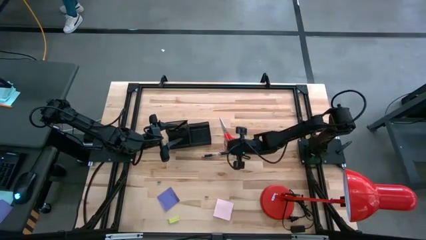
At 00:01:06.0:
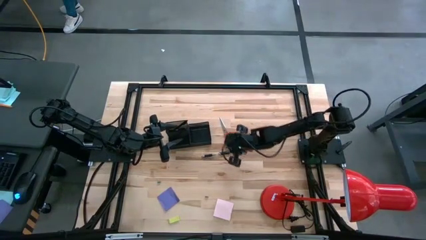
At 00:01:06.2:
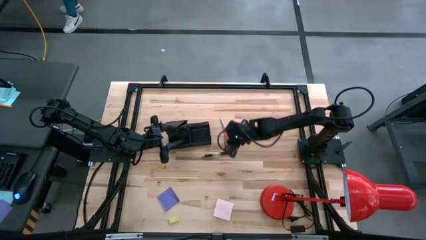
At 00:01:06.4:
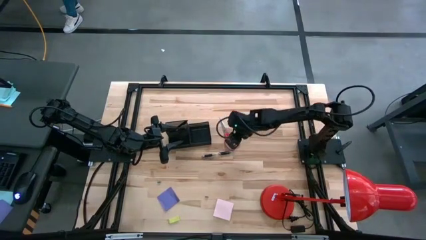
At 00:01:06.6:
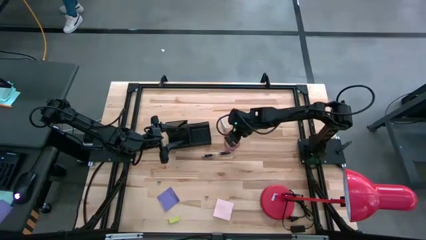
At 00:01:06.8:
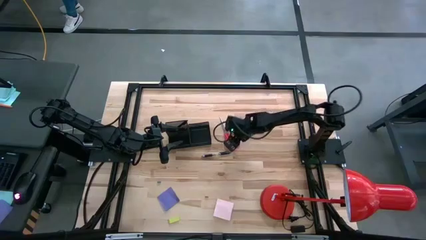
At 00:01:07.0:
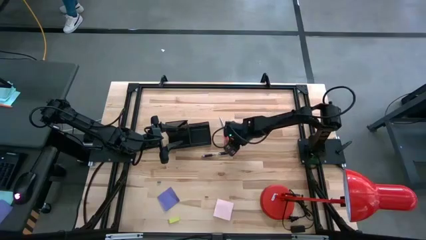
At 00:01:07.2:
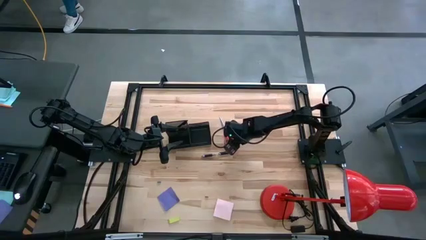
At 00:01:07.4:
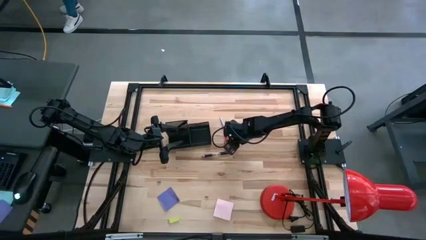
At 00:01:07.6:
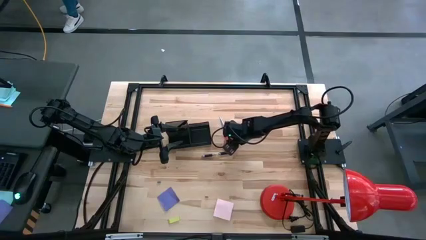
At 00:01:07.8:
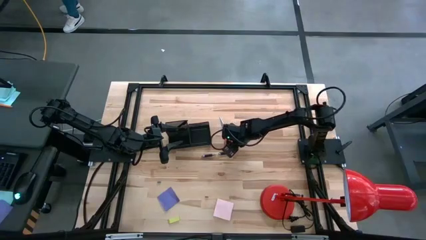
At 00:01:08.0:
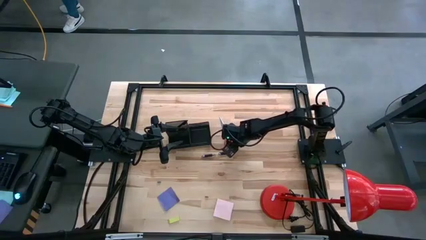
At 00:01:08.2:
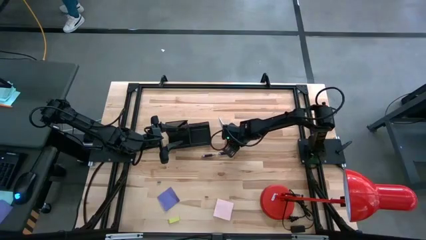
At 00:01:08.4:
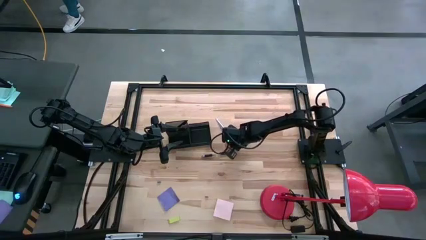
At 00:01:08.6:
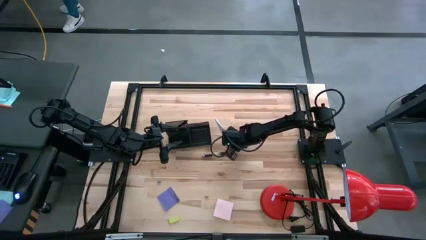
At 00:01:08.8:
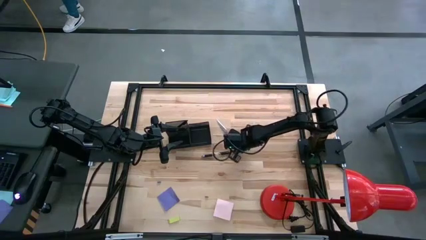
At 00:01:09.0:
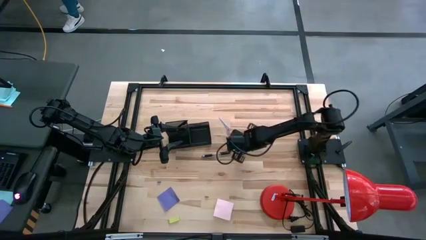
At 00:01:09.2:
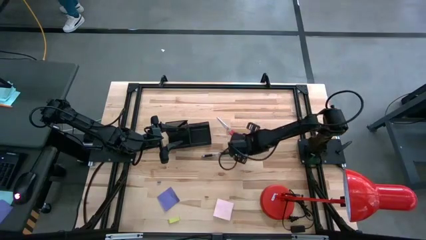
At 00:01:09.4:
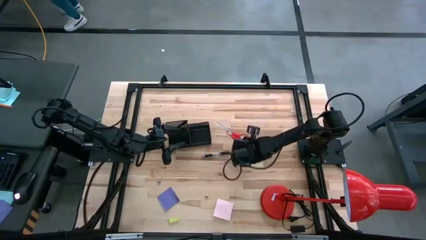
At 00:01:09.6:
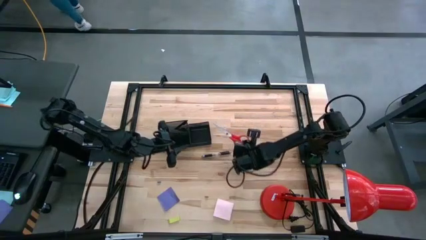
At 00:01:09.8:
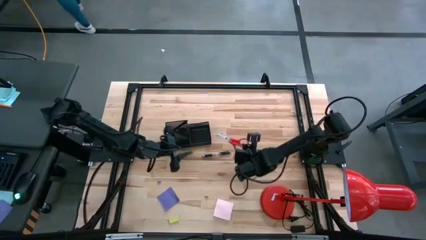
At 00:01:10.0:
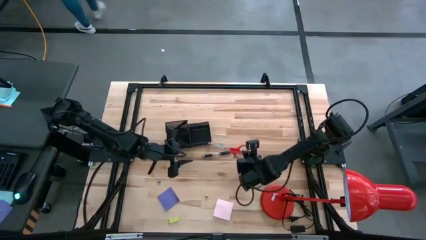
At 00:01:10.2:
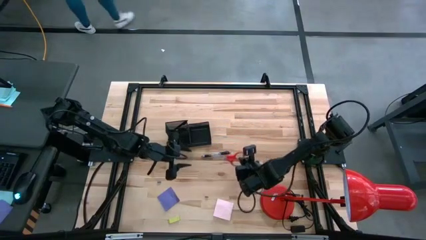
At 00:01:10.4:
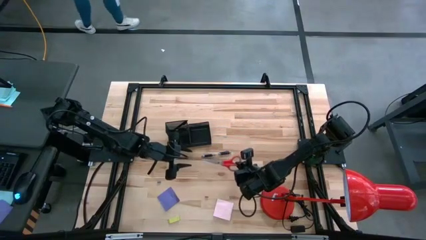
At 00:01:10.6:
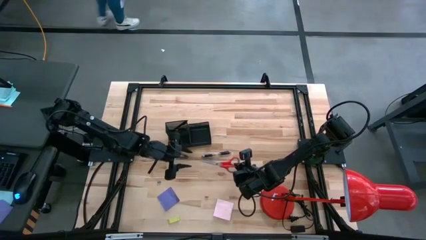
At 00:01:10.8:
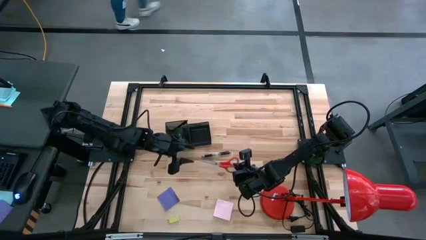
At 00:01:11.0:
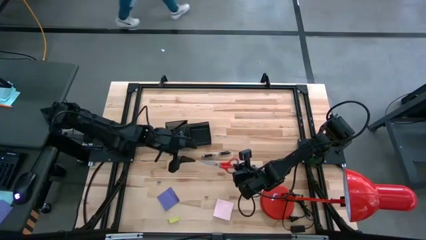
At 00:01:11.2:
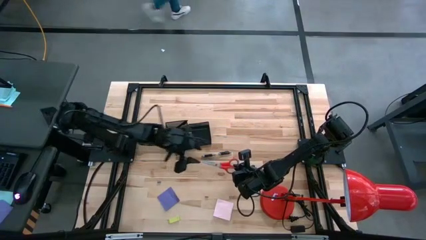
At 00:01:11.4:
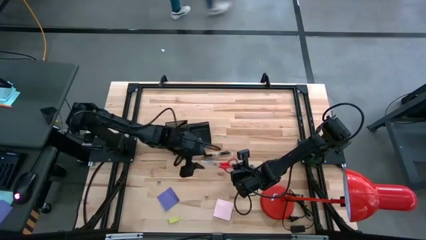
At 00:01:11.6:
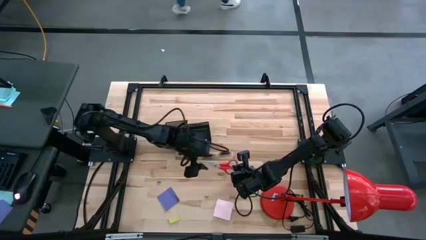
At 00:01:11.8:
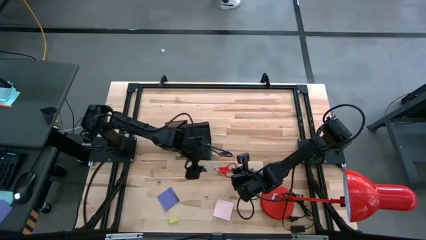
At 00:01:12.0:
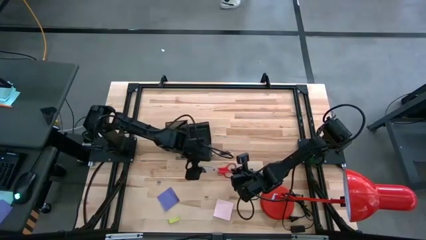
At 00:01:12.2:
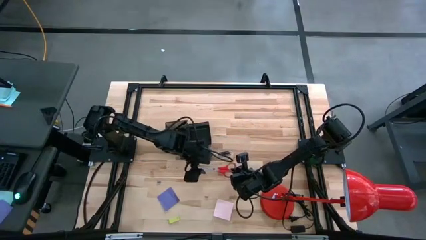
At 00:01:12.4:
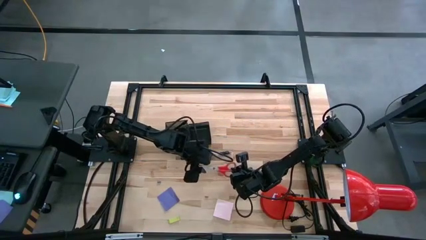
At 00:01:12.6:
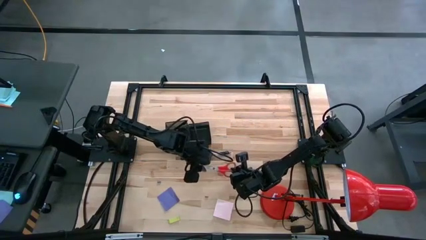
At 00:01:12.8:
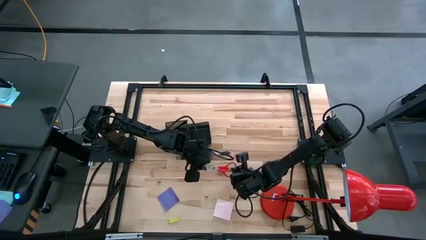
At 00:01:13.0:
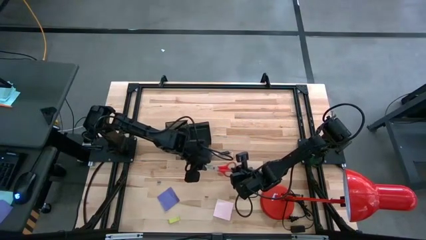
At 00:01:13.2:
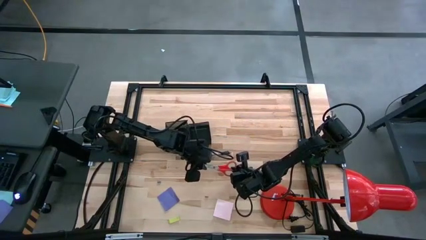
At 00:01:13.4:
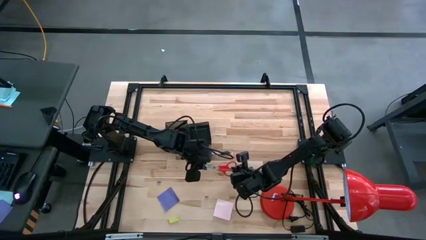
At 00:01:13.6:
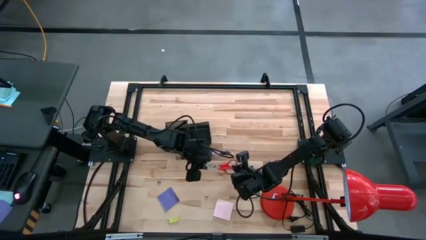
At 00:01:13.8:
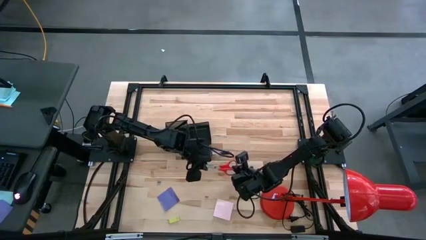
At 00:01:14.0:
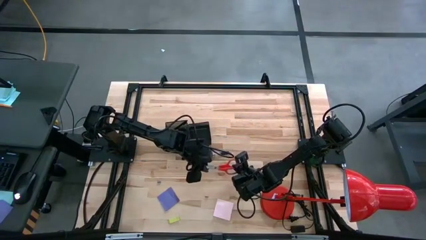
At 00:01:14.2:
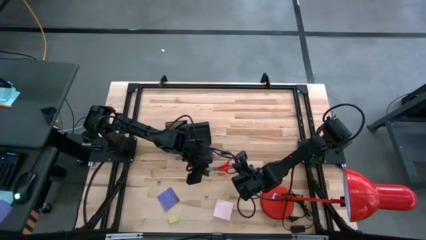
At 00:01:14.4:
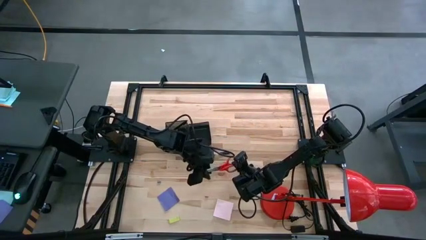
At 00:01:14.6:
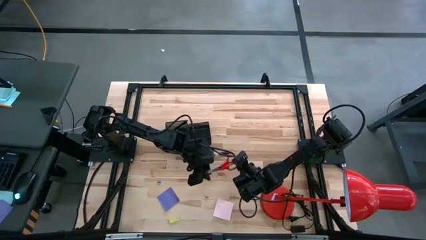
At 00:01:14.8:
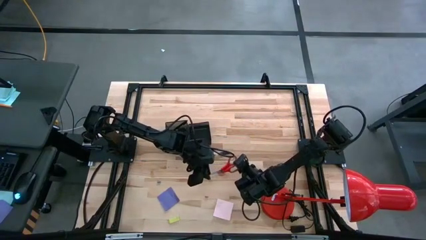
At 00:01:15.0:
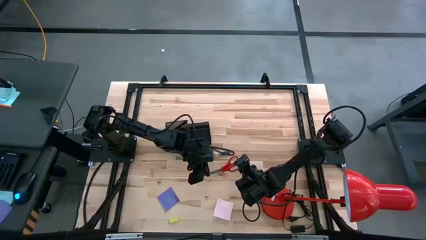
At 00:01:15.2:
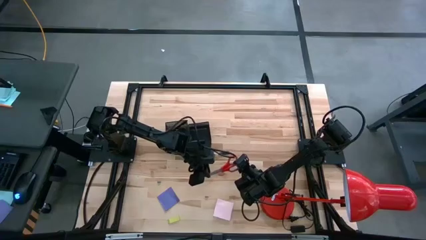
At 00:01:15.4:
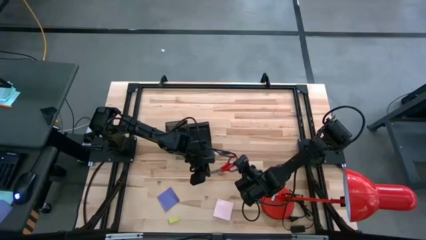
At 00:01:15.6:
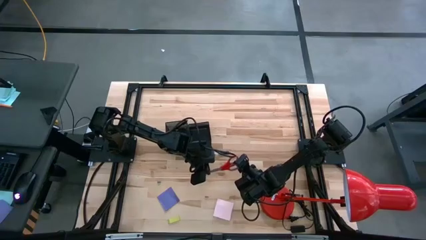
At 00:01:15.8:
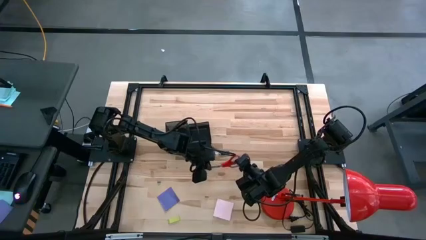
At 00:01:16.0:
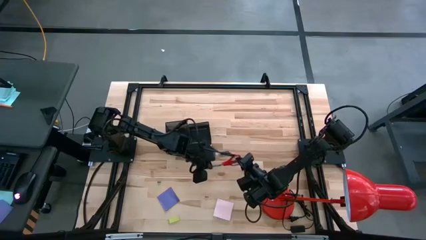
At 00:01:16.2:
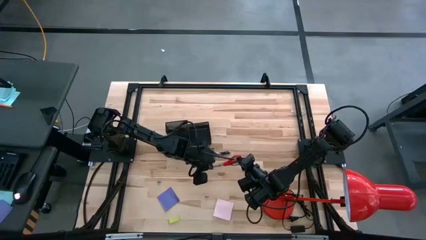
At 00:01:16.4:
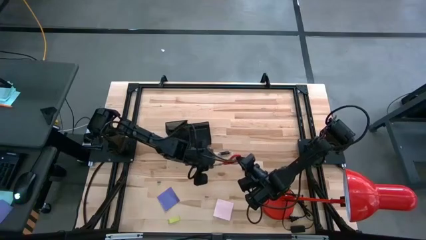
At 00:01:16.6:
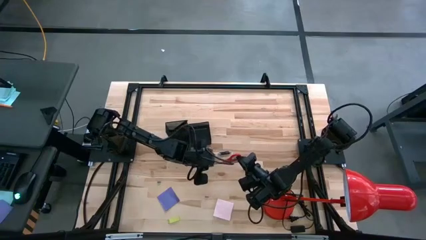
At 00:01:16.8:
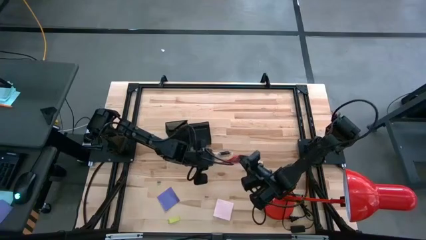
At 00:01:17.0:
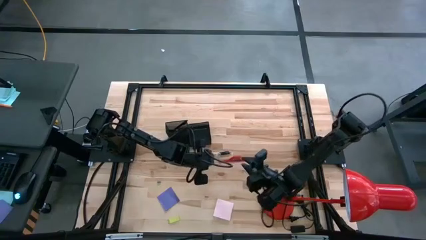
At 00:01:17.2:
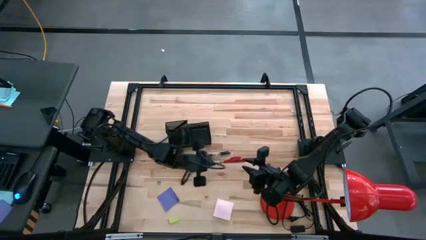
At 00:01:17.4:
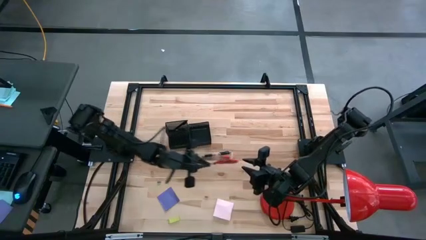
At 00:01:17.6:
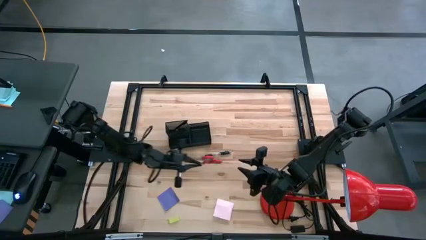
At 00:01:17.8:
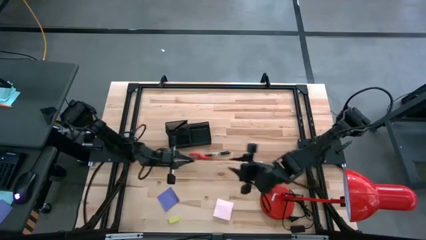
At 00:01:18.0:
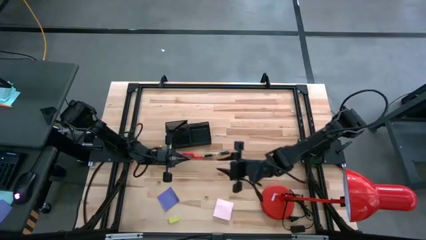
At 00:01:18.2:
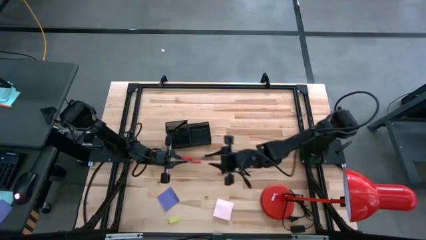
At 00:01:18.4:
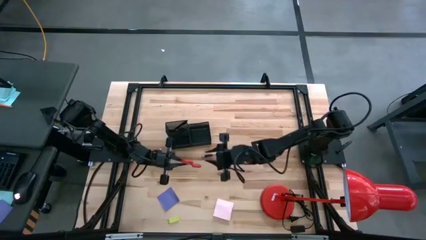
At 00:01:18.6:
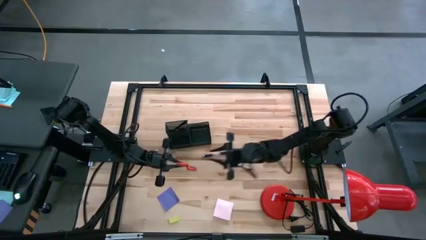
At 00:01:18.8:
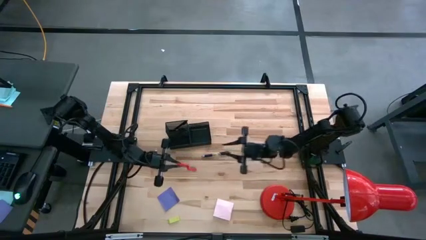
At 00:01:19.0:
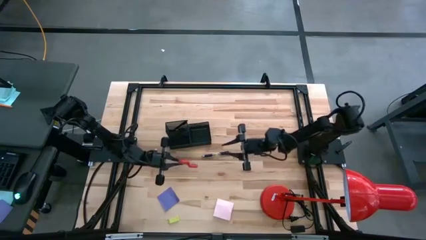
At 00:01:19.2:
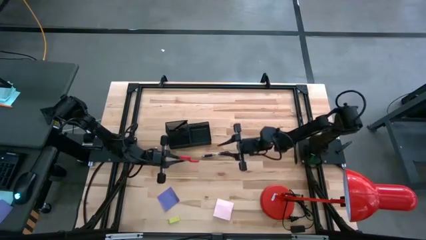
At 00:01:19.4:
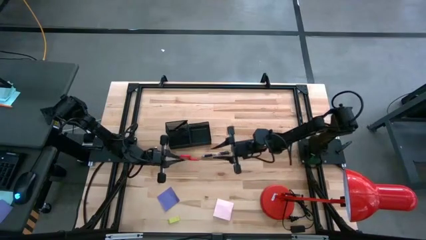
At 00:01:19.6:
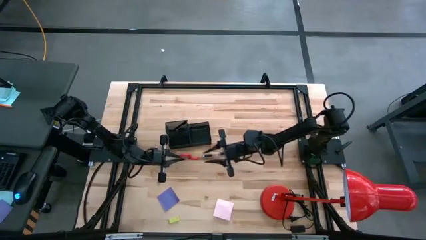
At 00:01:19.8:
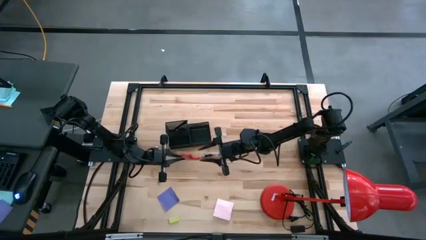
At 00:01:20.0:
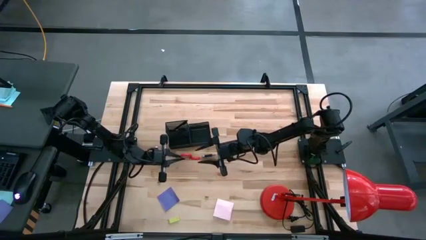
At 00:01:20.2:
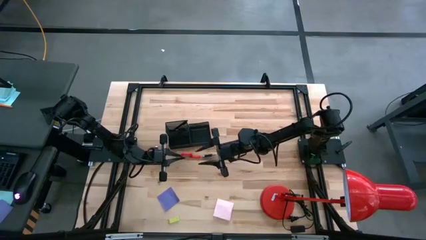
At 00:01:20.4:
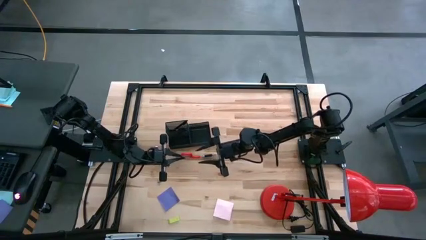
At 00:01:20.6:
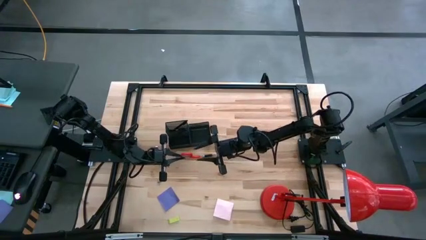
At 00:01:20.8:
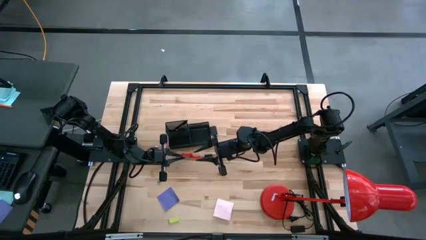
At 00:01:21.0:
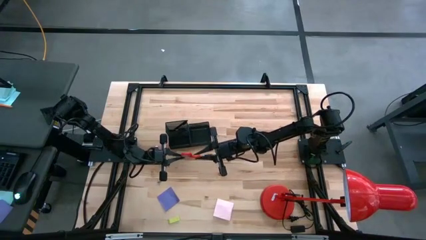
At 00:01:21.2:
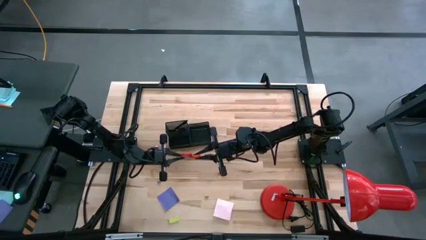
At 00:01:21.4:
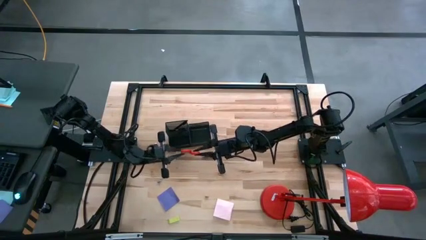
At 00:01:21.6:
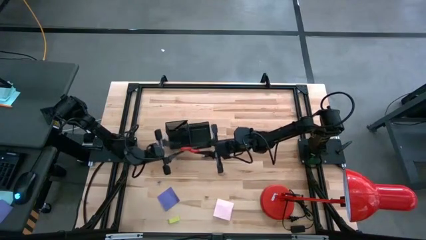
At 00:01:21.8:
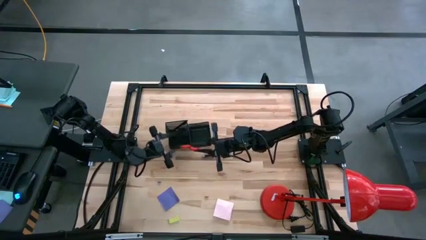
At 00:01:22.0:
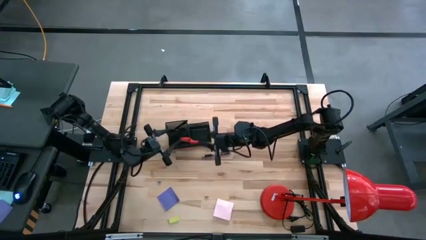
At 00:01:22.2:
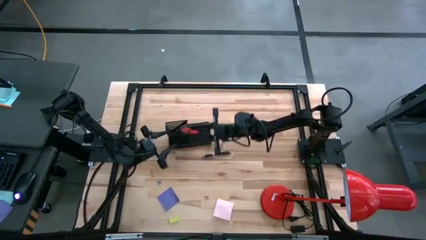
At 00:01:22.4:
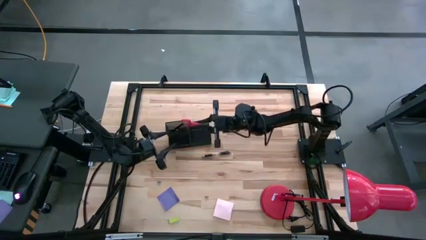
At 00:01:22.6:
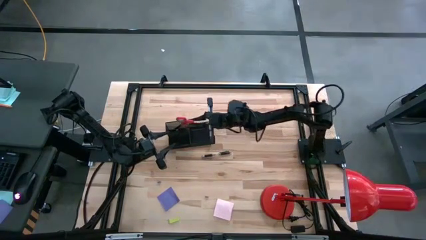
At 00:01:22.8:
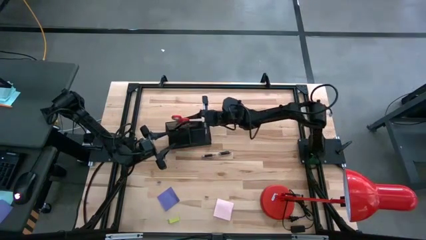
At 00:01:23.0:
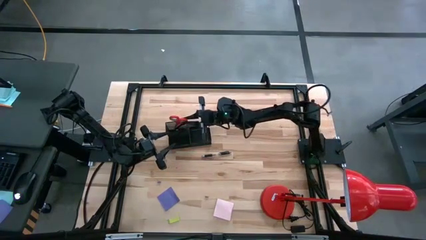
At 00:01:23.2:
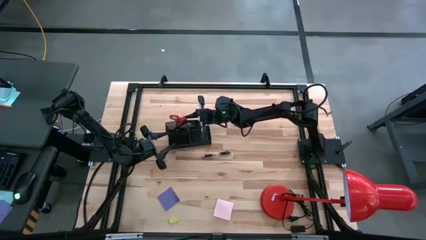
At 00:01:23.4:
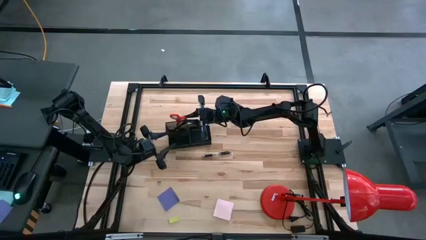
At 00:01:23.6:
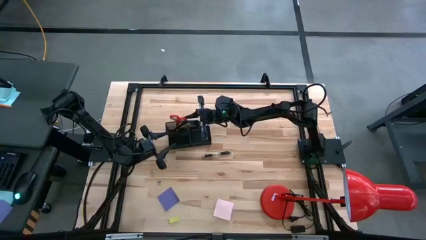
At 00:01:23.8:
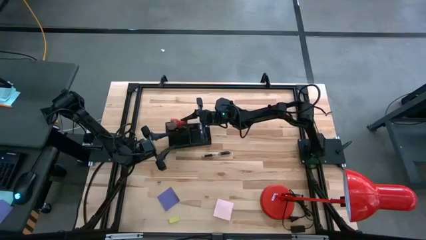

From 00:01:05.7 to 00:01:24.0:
Task: Pick and place office supplies into organizer
Put the scissors into the desk organizer
